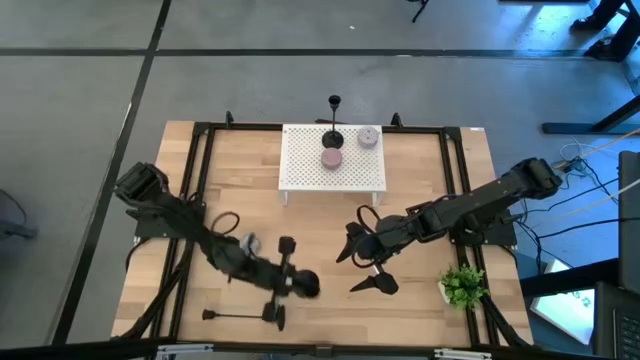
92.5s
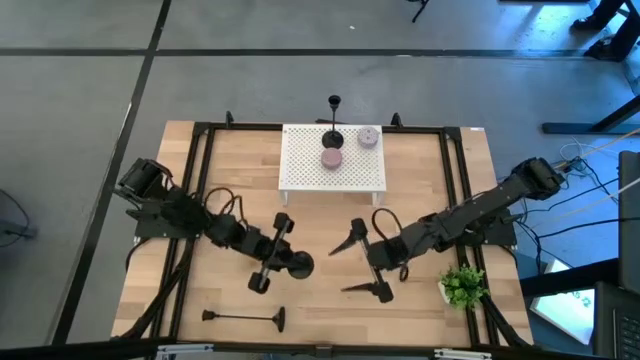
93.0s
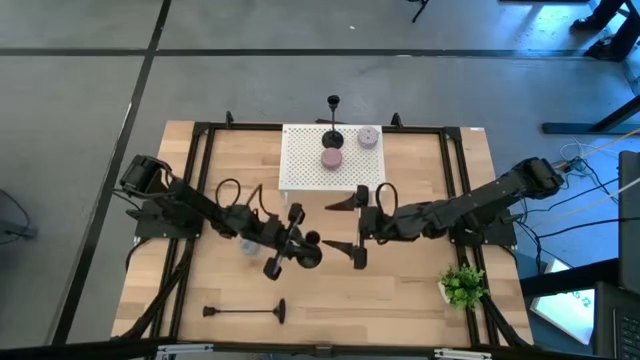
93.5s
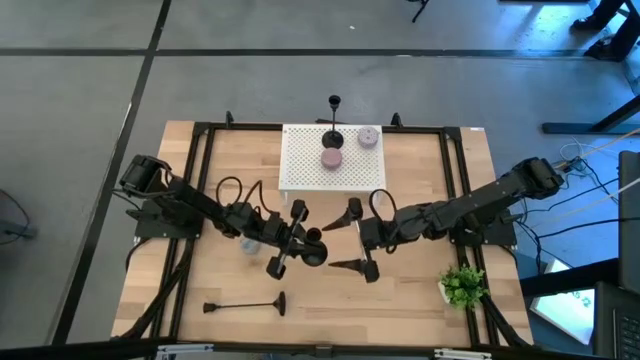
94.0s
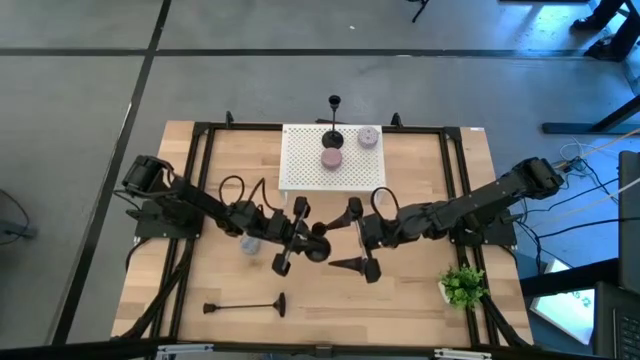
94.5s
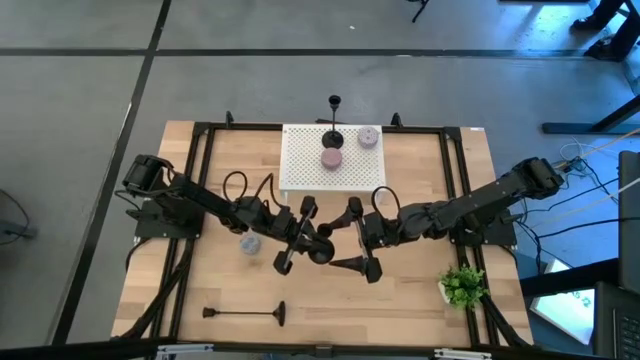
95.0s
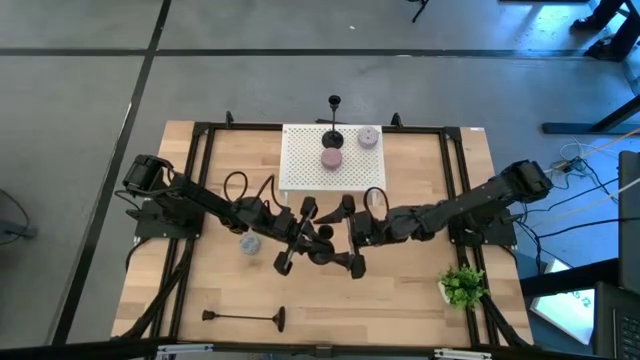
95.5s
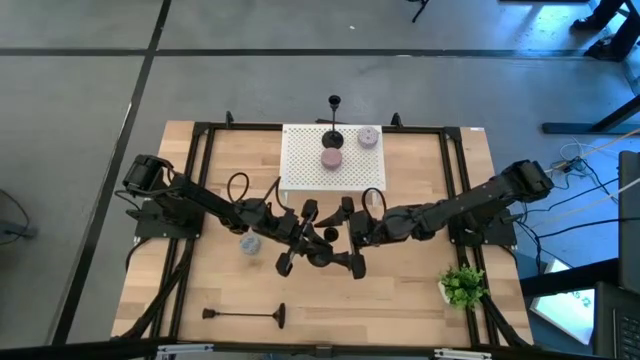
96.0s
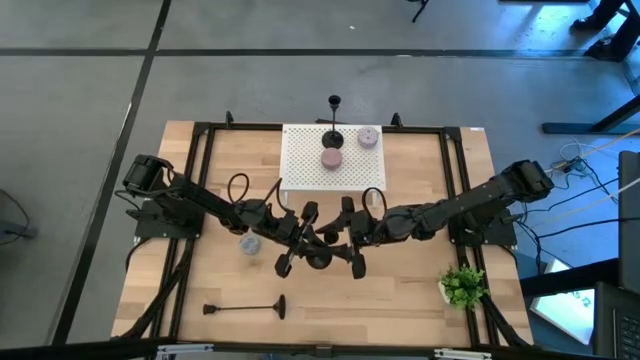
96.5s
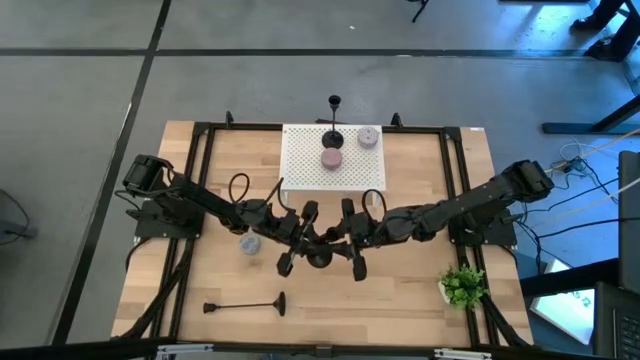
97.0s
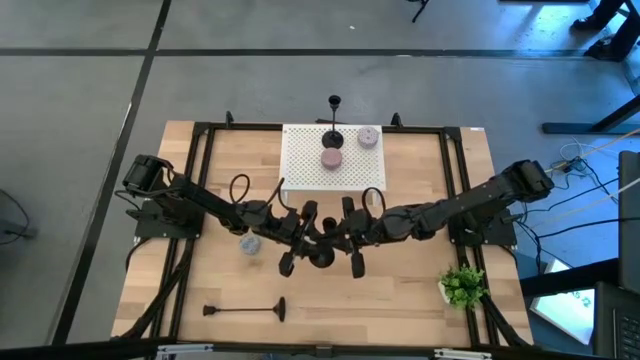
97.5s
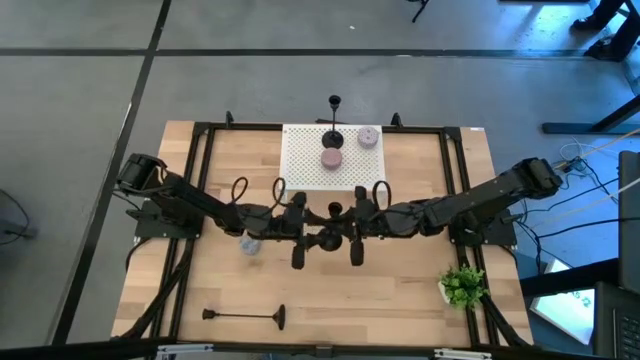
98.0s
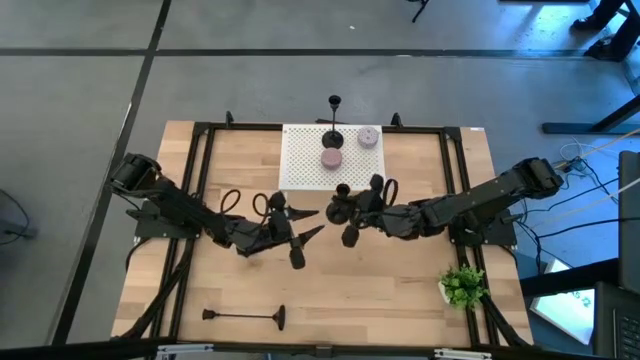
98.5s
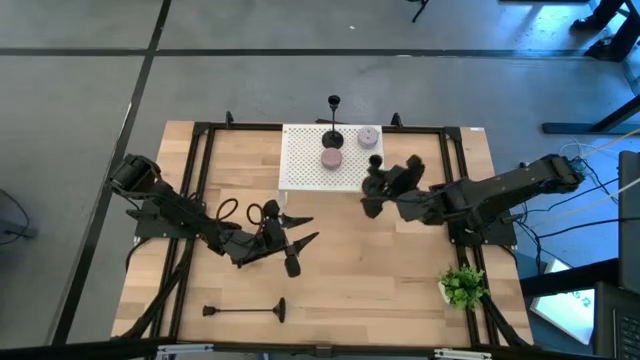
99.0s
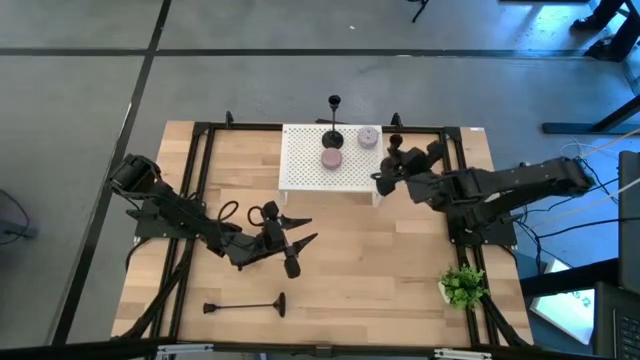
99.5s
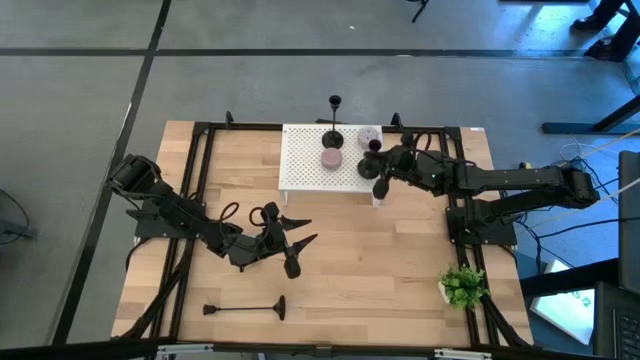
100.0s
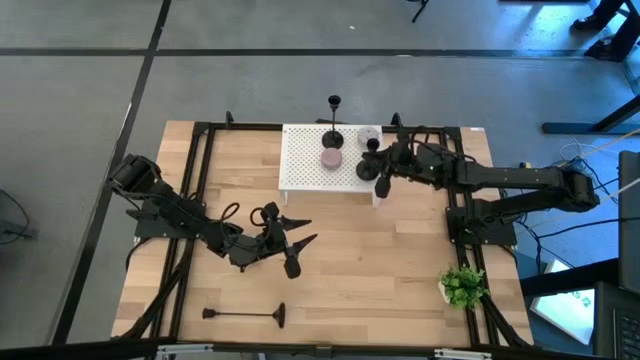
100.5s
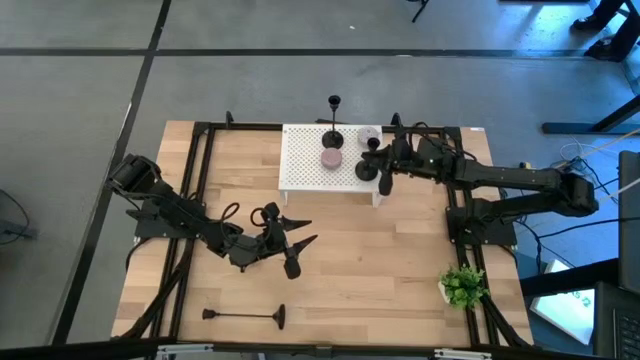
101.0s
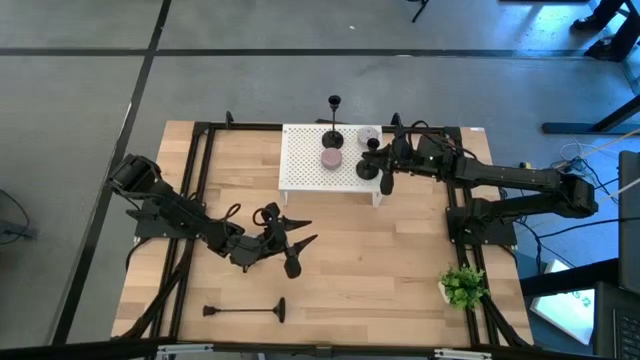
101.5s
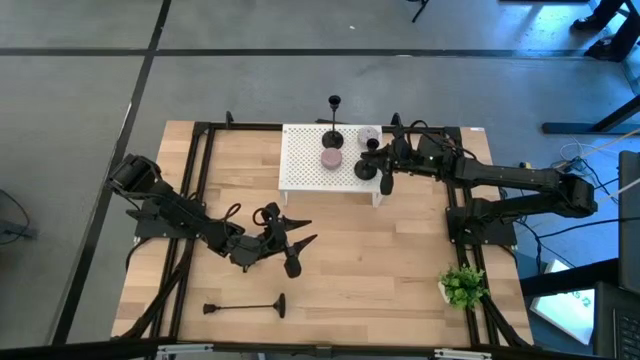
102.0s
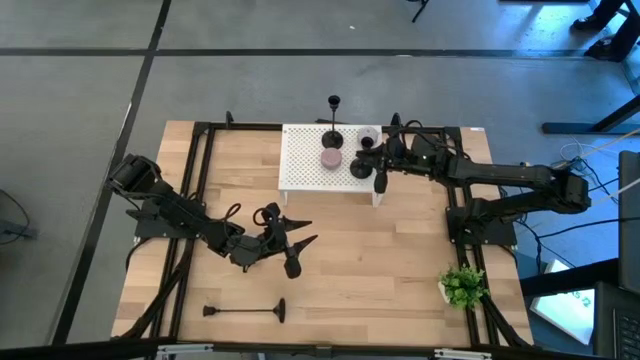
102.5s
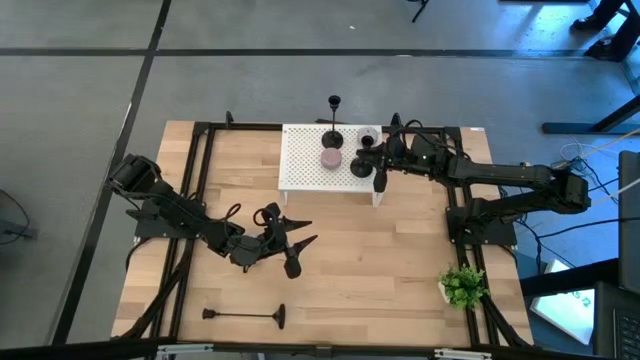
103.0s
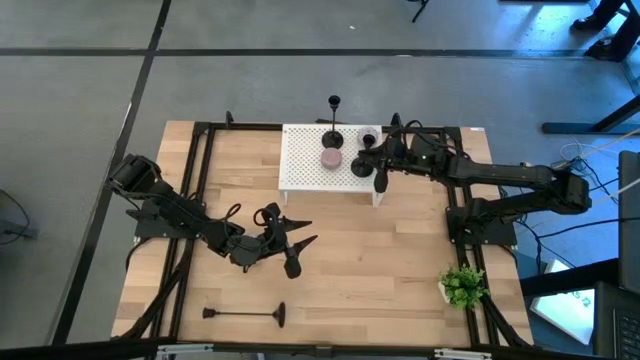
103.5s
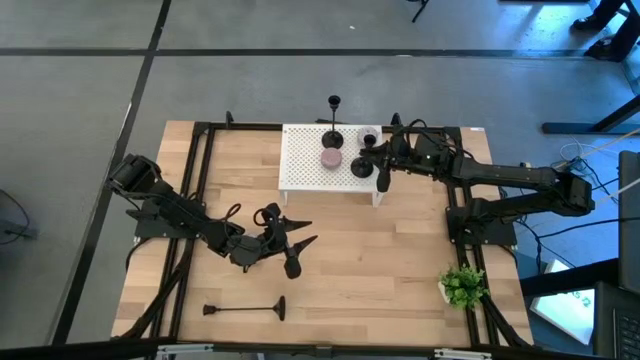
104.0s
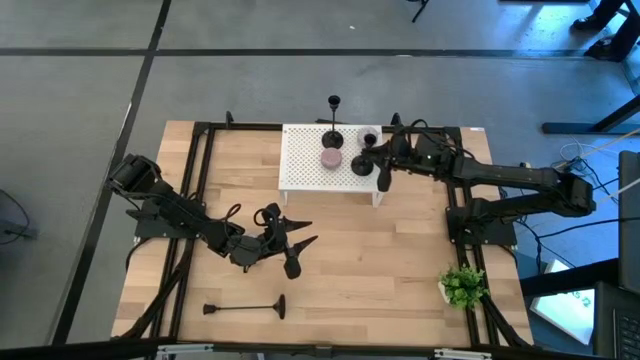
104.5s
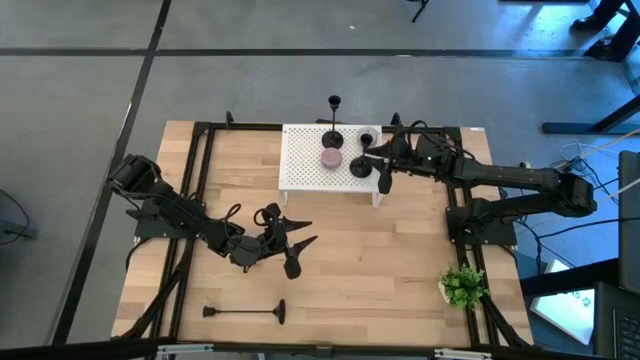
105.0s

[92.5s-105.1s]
Task: Pick & Place candle stick holders
Put the top black candle holder on the shelf

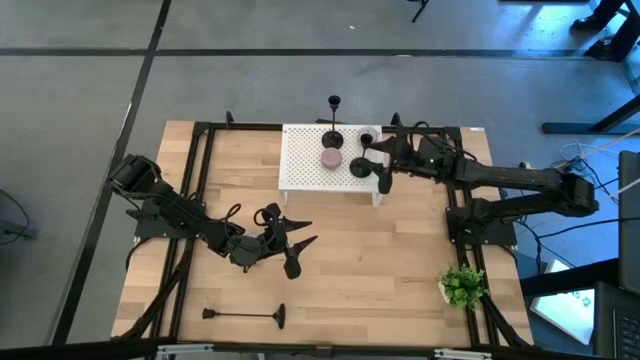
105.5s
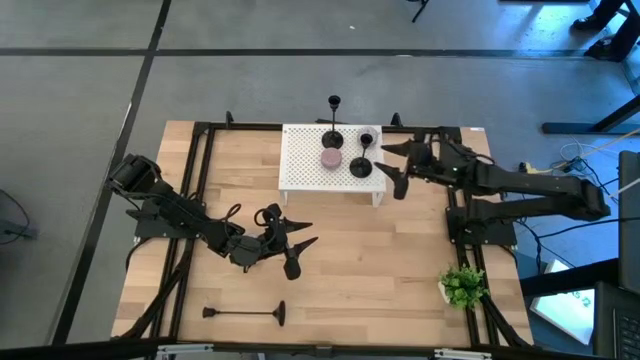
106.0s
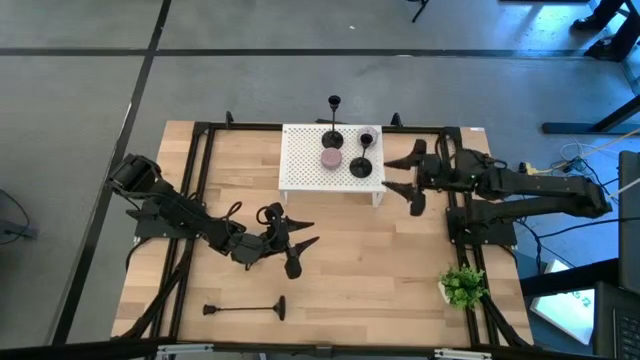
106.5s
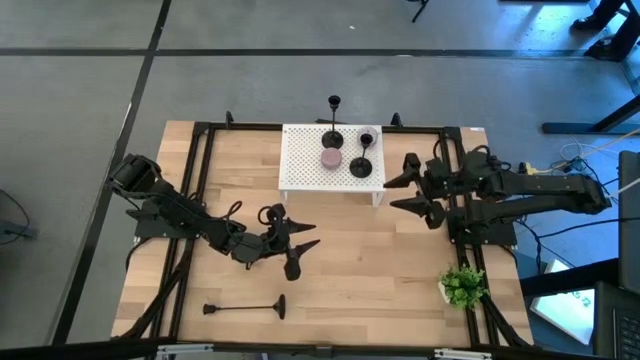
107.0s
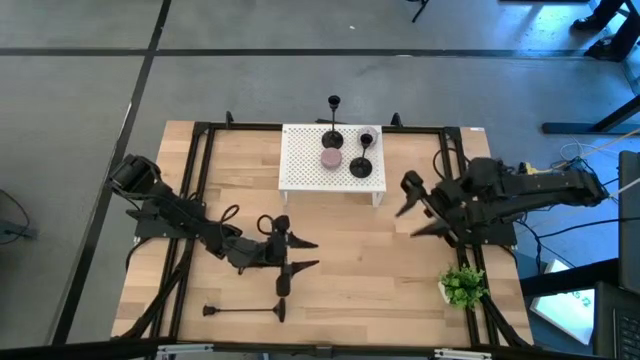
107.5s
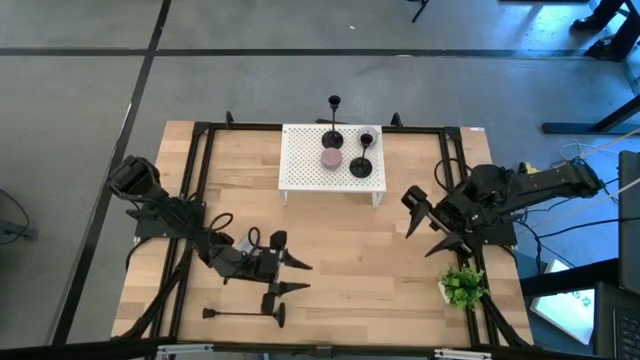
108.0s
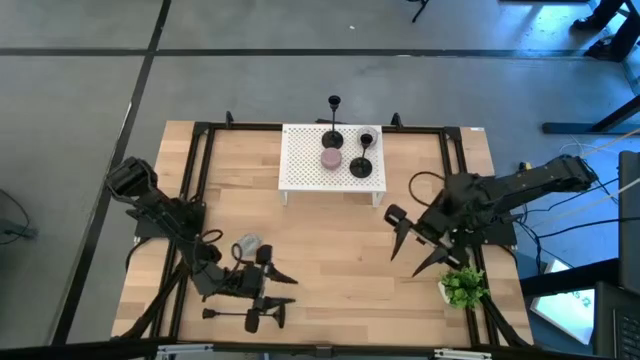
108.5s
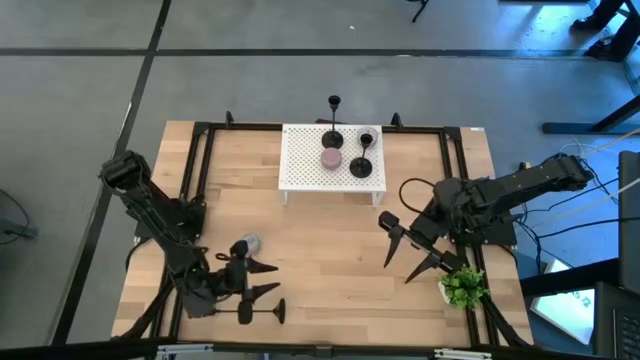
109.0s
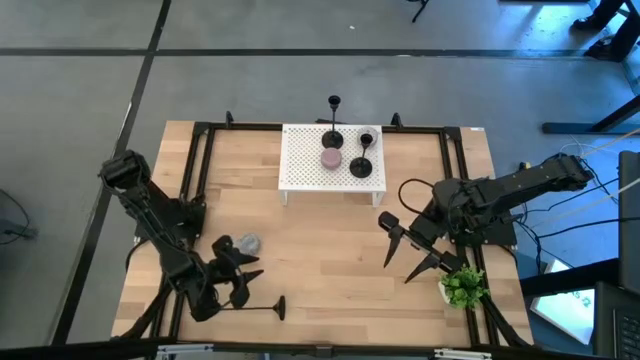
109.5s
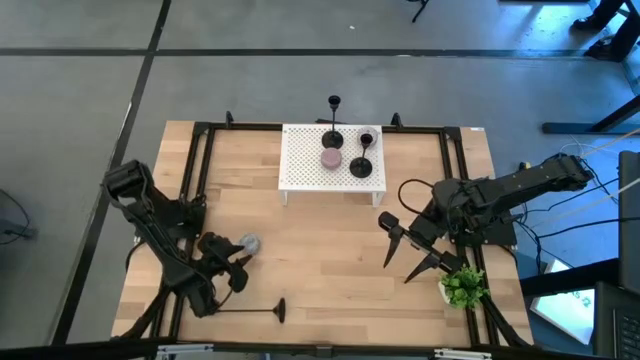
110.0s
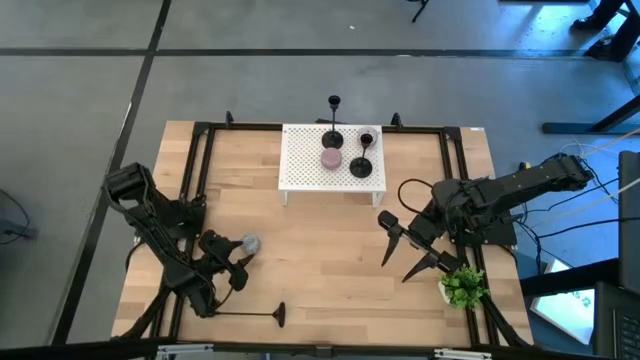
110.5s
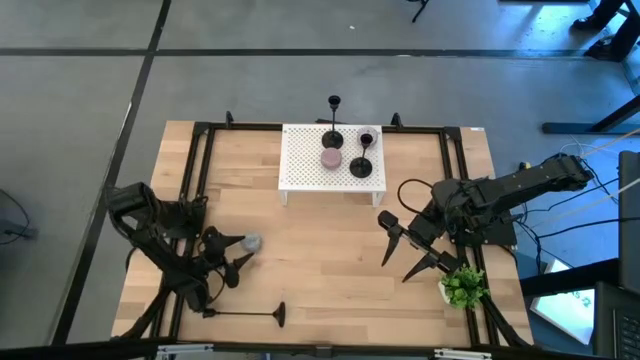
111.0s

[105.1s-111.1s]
Put the gray scented candle on the shelf

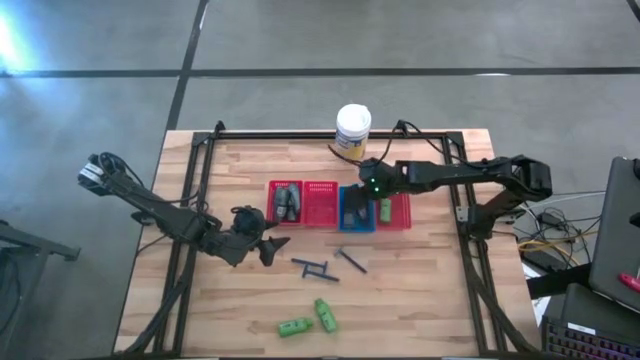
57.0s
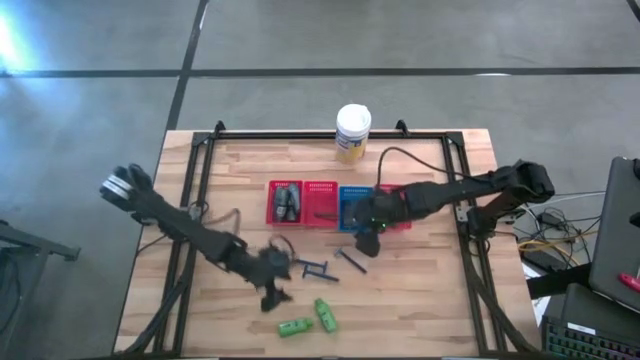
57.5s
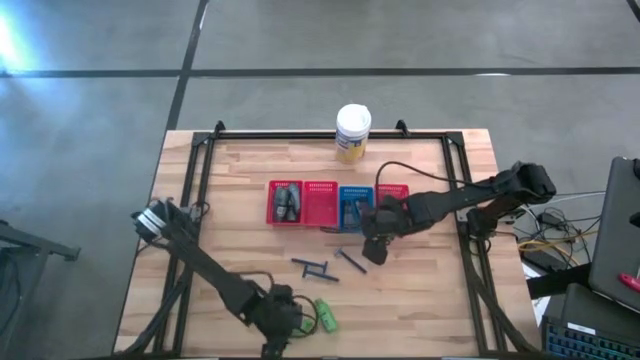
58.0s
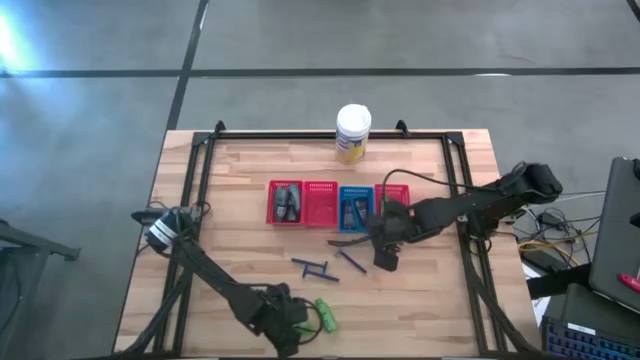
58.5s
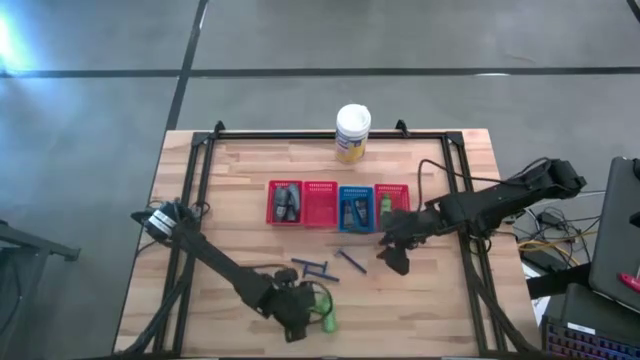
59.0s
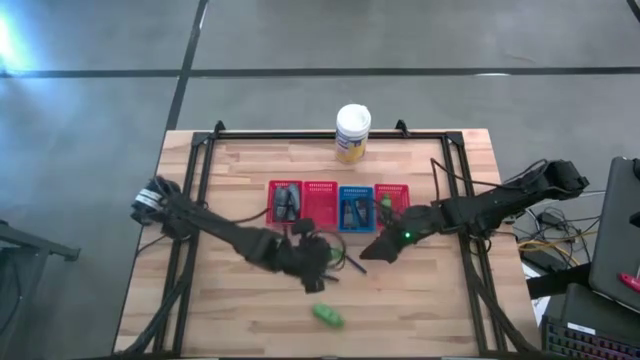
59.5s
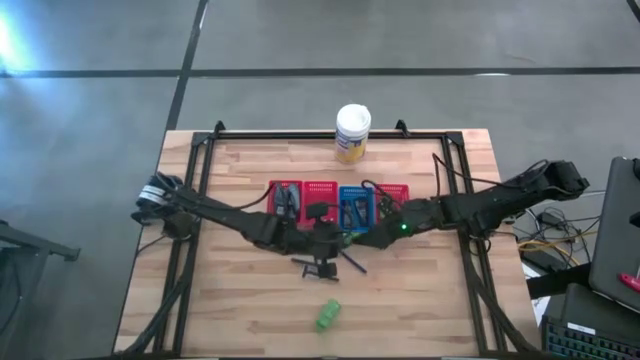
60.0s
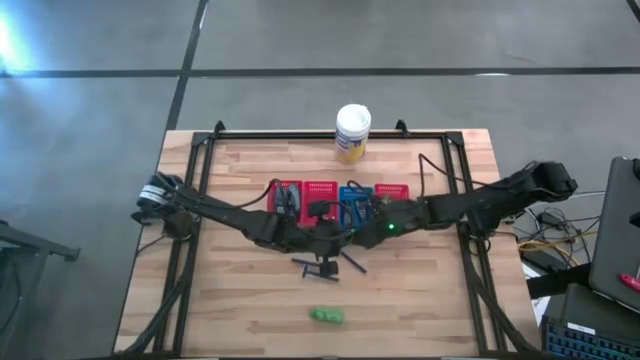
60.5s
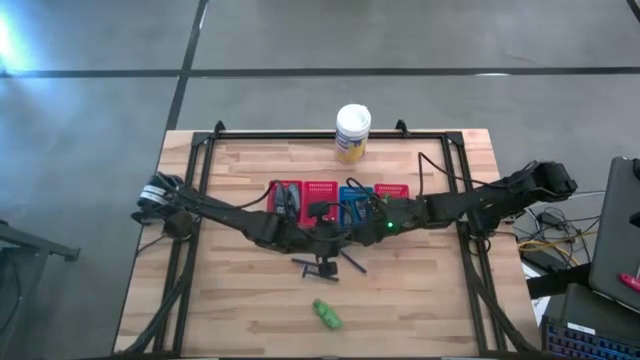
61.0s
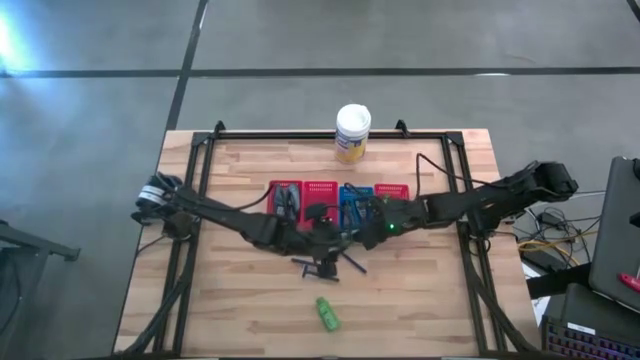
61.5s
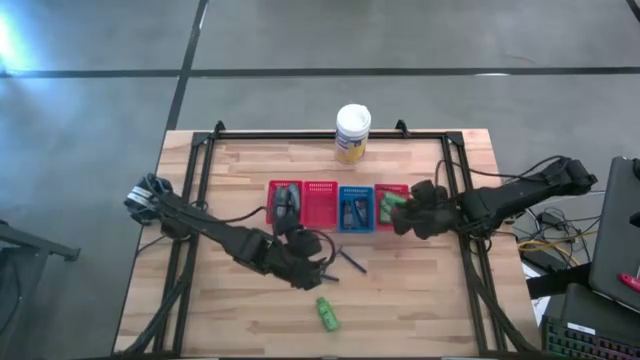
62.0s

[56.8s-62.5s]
Task: Pick & Place Travel size toiletries
Put the green shampoo into the right red bin
